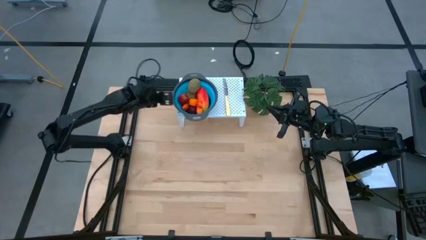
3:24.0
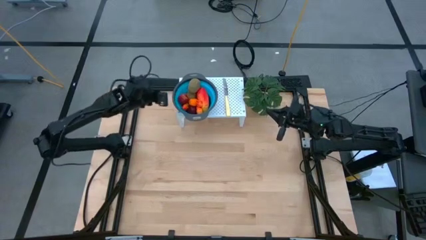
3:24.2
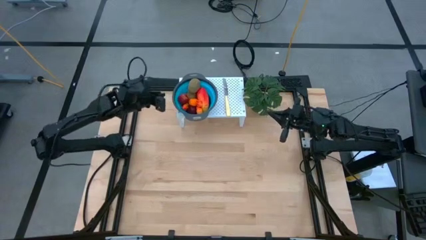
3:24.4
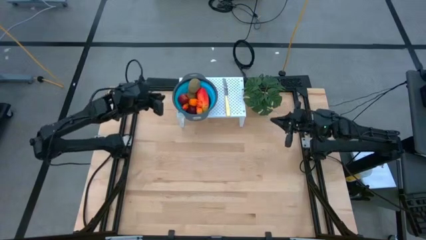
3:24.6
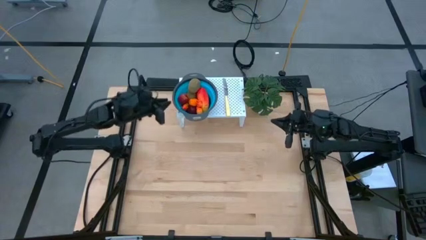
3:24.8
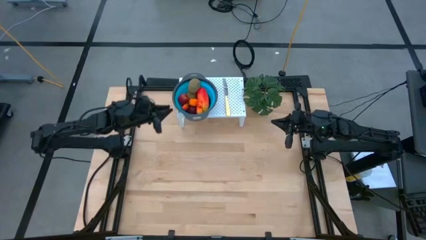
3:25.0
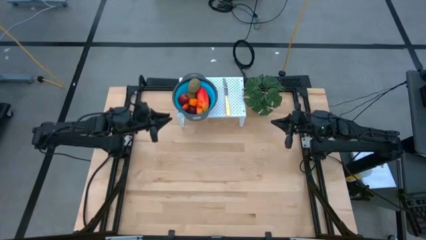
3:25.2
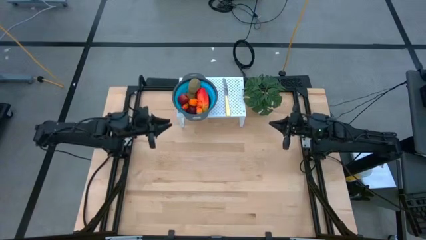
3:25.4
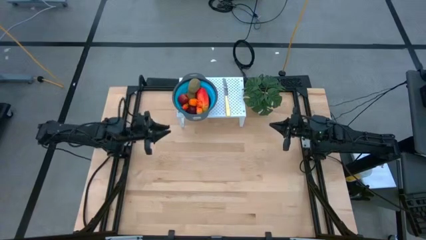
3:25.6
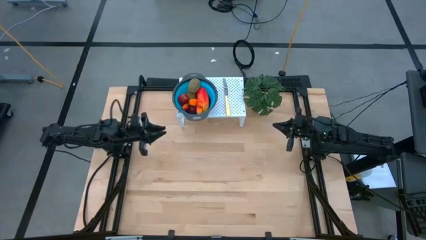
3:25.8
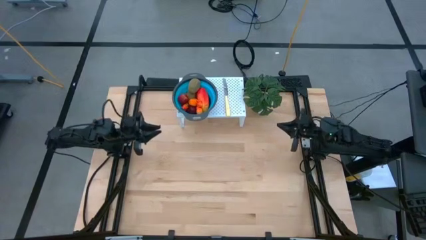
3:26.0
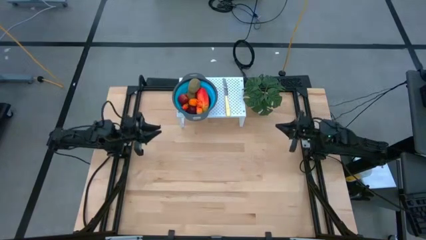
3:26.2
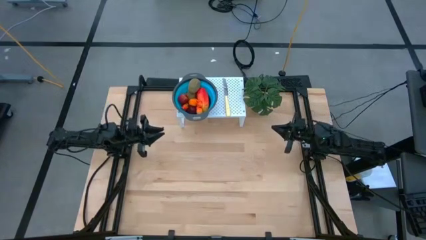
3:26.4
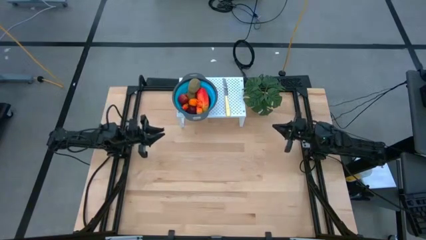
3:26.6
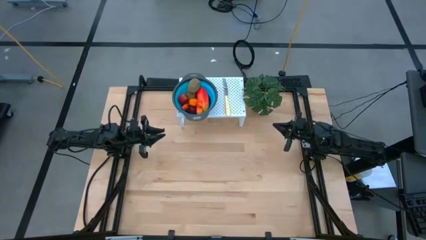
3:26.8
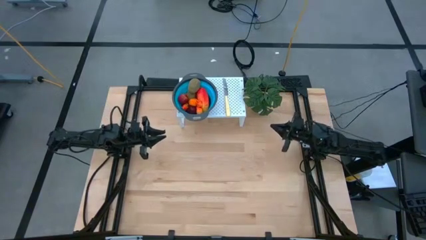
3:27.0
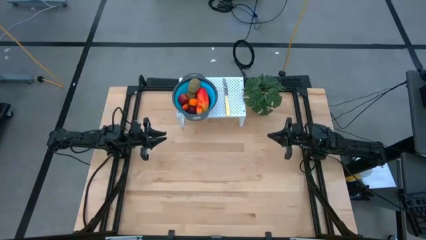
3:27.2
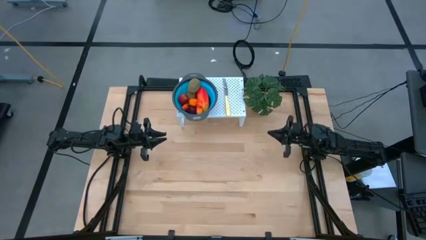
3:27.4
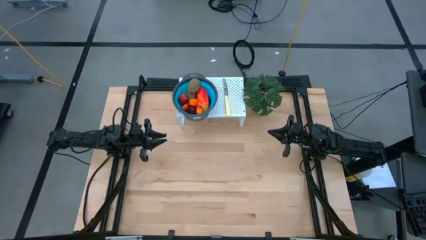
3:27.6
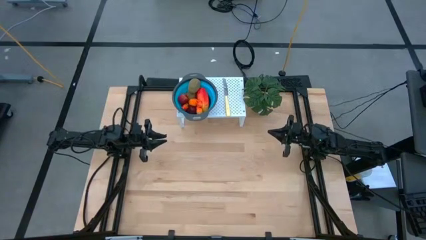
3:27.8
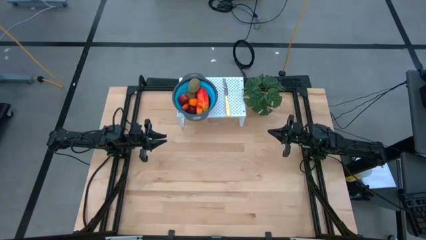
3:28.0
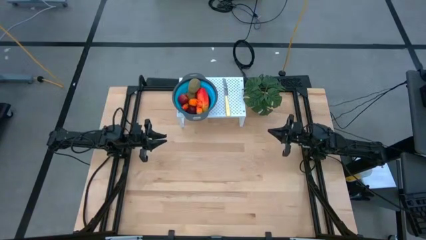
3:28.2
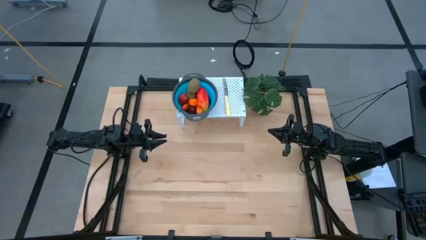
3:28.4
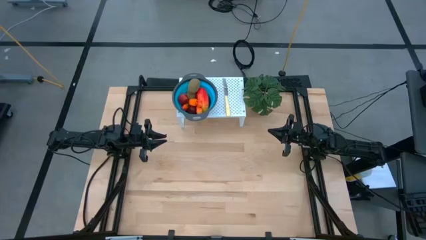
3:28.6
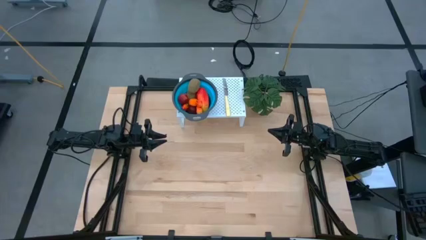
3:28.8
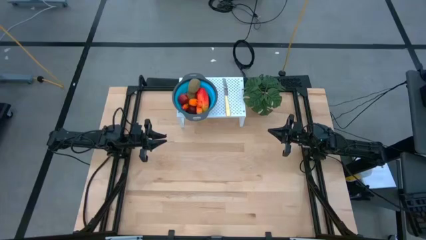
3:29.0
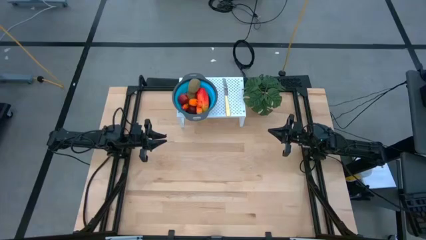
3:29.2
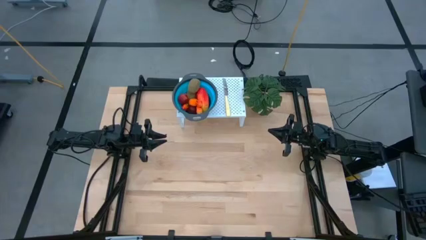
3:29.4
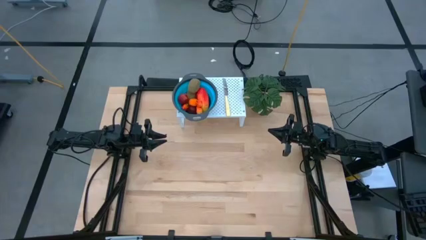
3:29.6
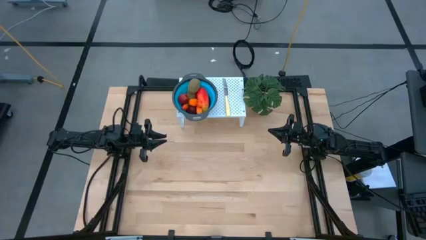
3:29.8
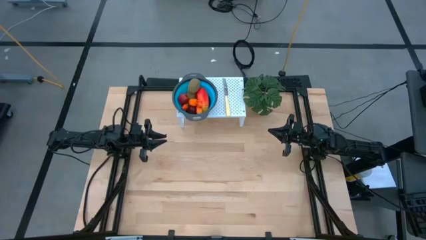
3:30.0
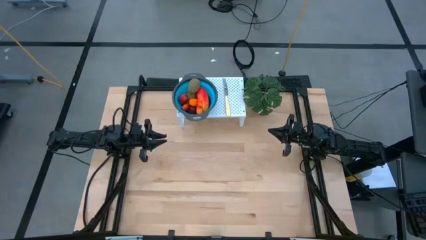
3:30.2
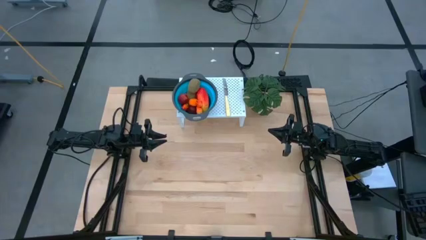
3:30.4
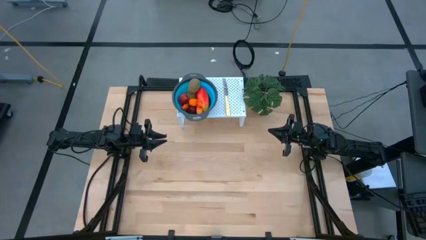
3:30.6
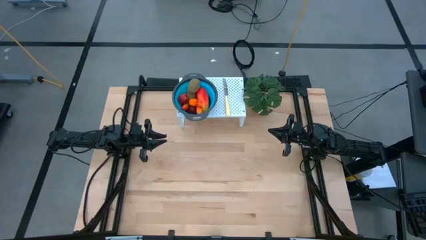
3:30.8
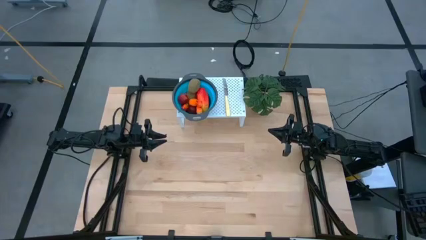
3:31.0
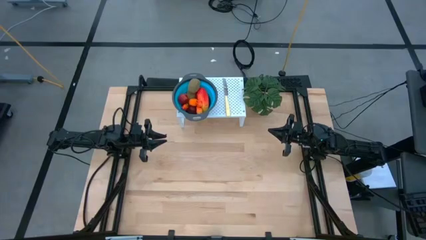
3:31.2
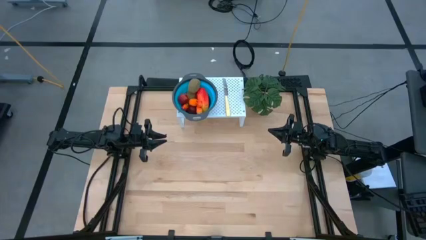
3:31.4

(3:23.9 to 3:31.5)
Task: Pick & Place Fruit
Return to Home Position

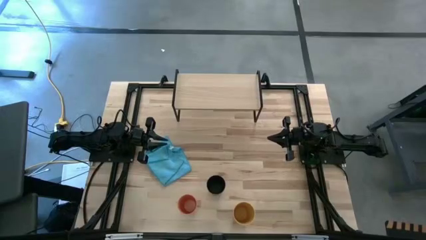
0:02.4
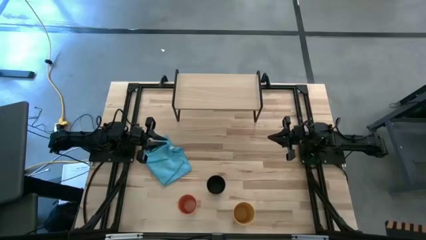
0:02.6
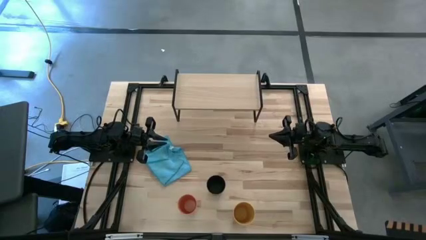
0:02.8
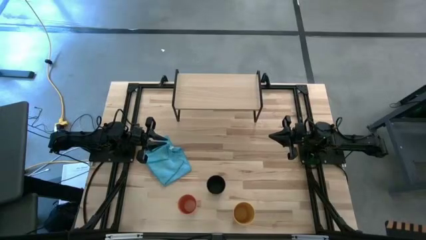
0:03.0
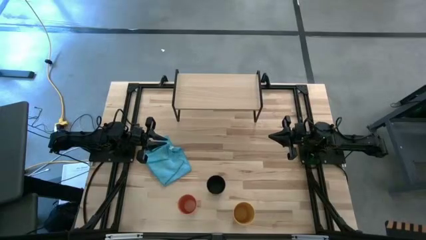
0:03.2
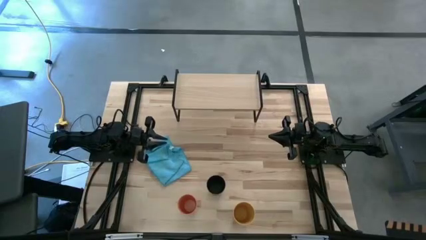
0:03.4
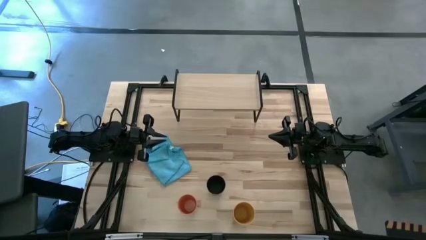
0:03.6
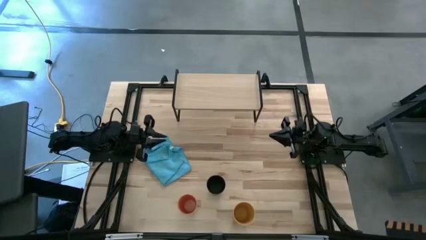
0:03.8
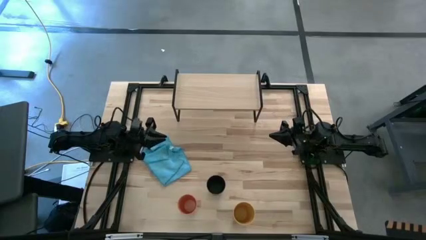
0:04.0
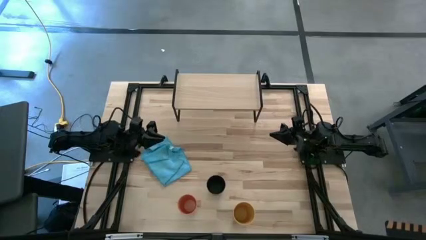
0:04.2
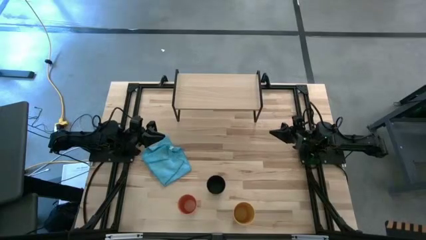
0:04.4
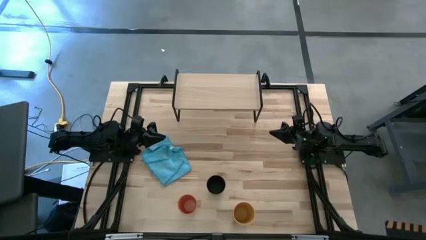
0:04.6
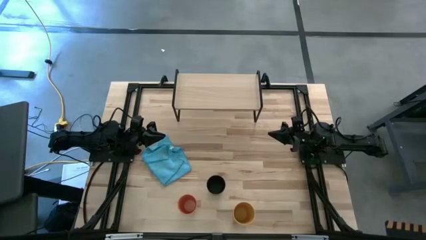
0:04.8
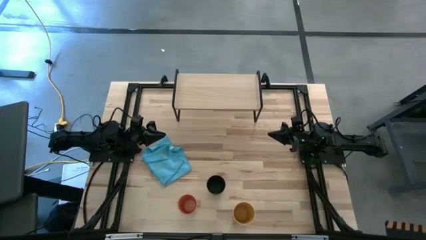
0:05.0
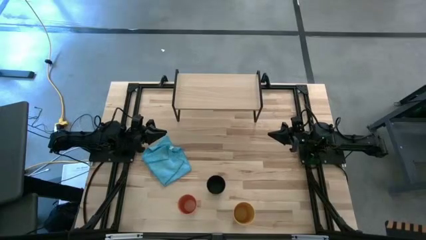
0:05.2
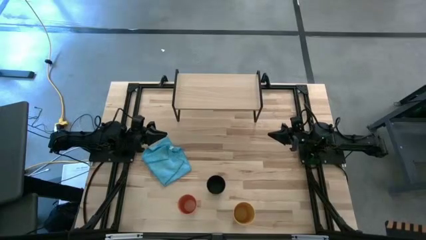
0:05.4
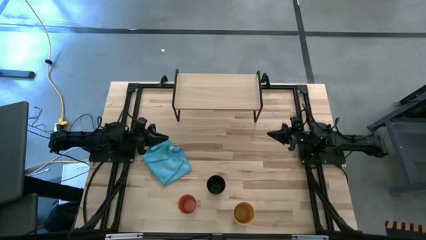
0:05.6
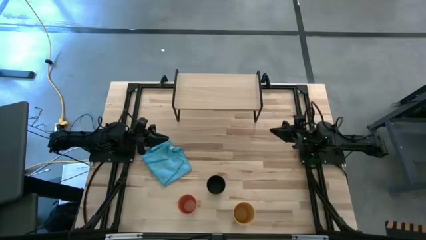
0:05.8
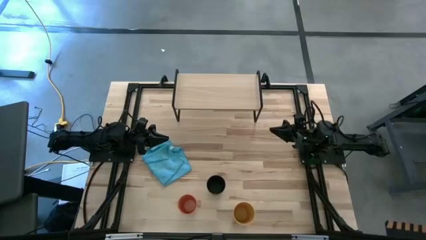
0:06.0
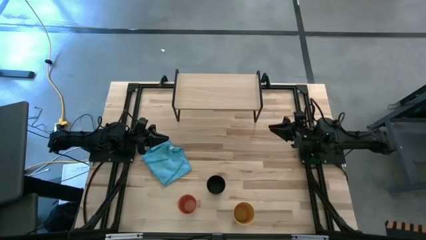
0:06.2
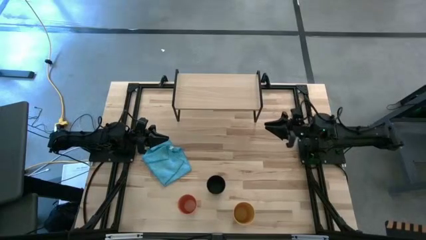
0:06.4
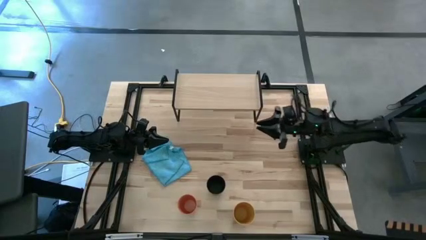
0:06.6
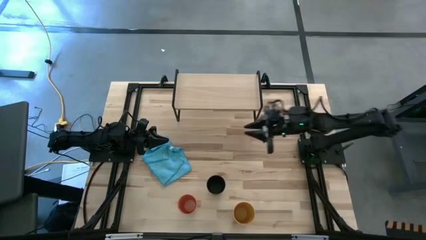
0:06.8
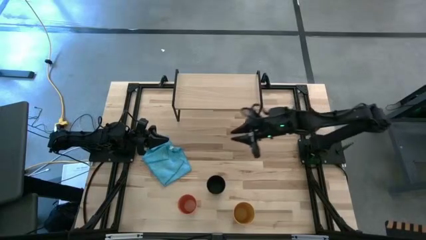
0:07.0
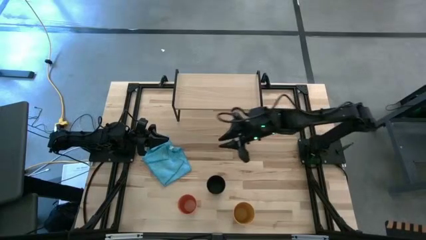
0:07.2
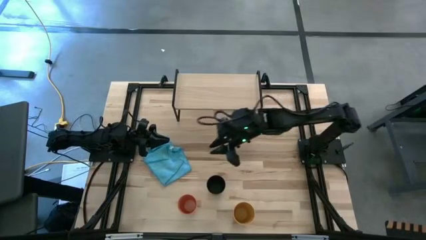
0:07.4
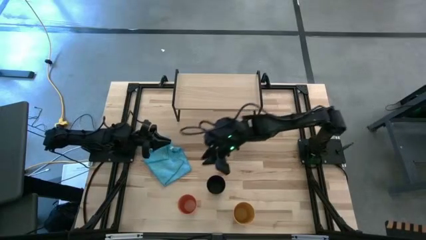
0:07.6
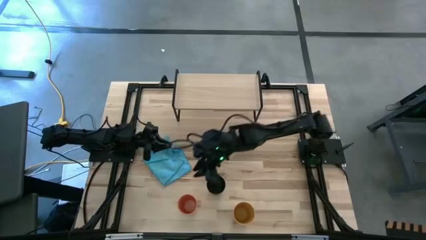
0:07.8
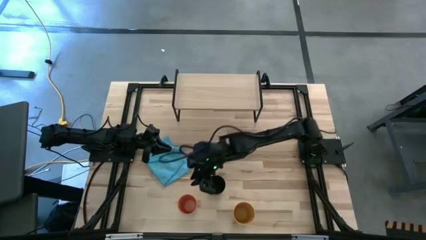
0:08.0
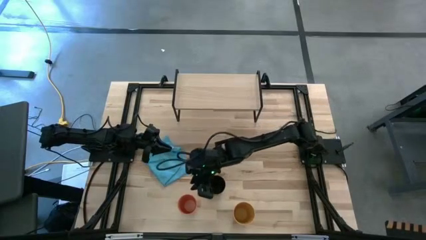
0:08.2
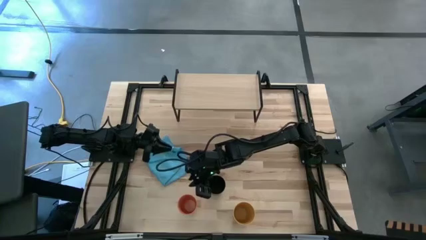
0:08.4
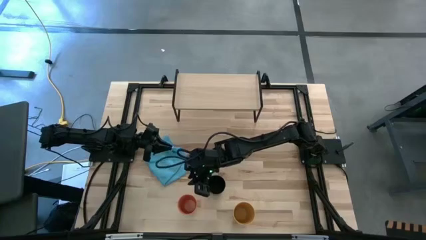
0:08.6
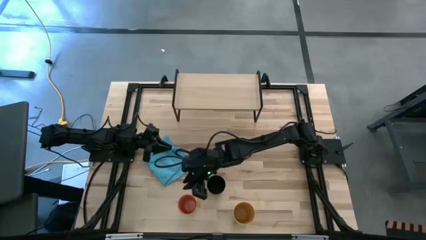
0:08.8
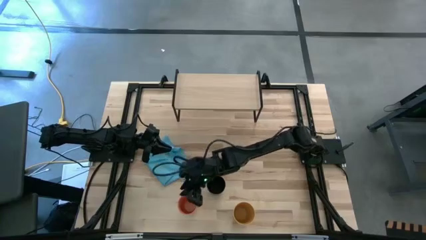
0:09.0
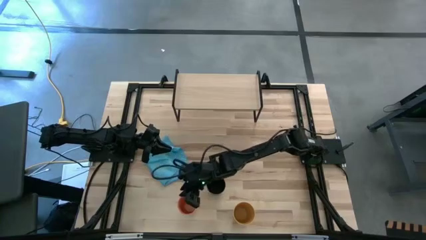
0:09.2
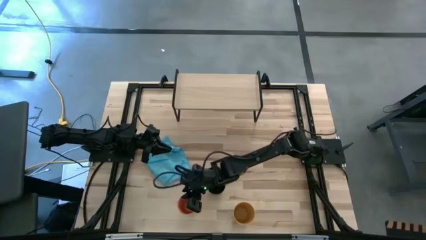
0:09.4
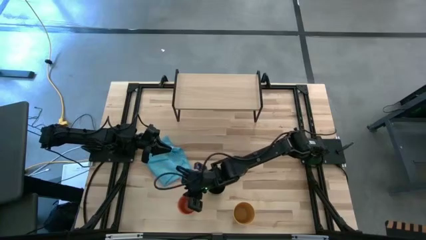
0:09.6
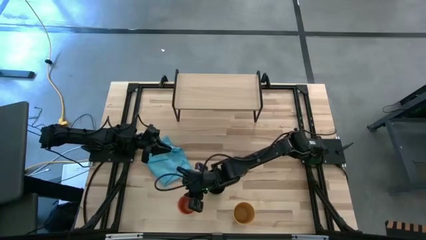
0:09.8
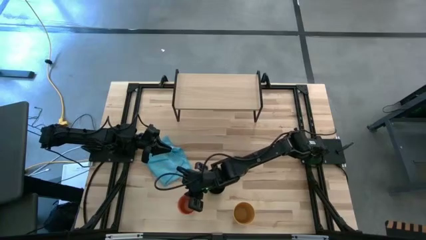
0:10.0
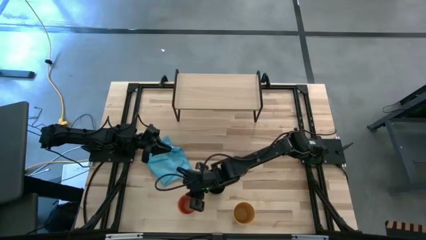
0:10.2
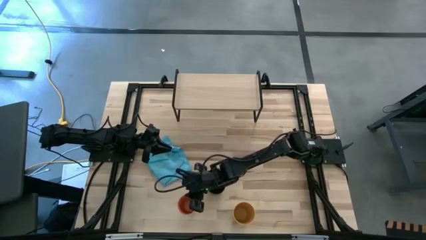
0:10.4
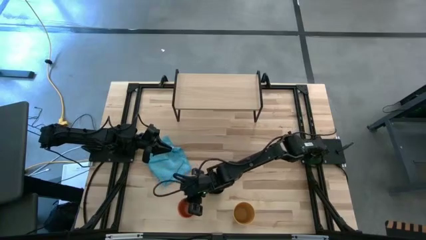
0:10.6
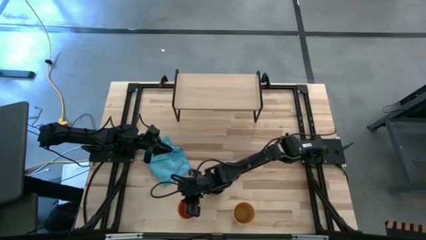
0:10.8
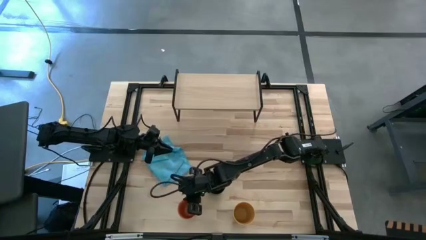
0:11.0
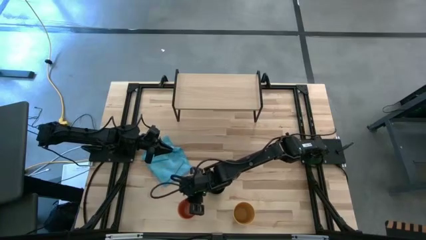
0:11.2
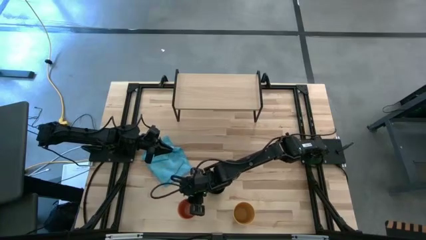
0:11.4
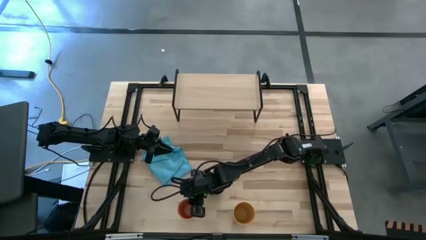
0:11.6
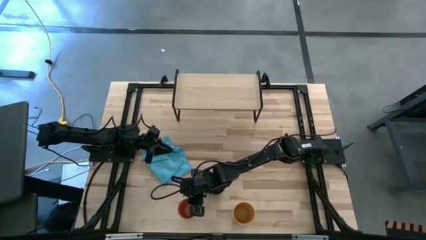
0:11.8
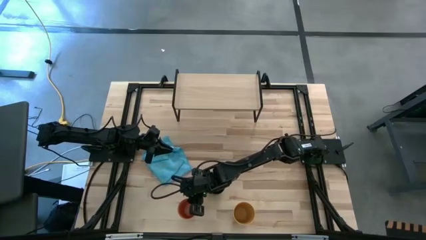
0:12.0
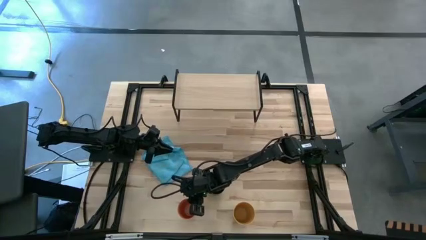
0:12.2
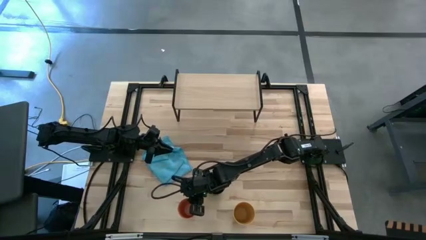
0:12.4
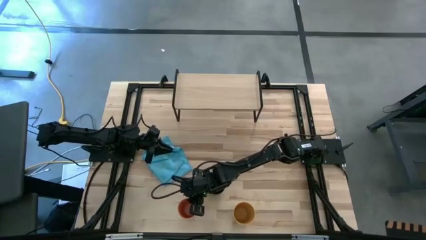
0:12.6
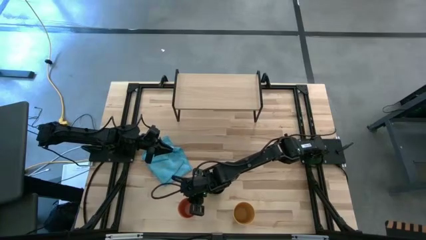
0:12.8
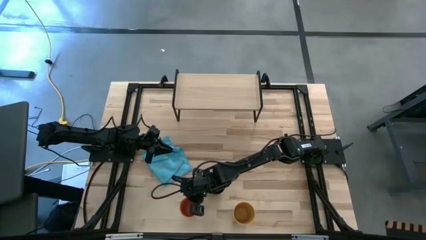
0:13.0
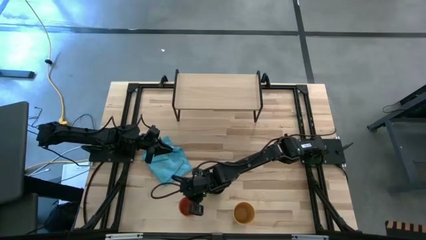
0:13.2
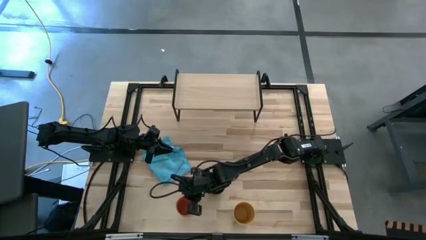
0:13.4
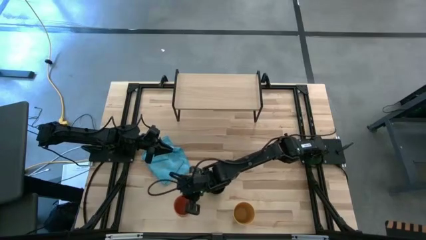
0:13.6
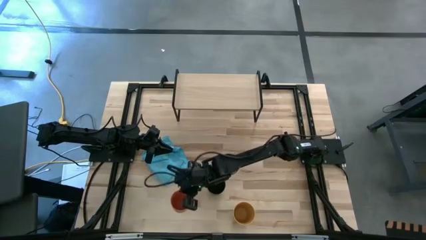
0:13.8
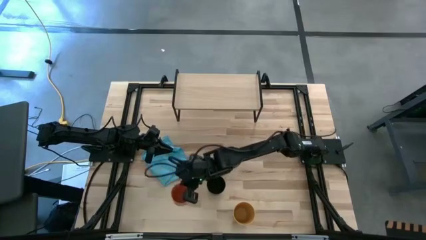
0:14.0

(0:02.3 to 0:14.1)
Task: Stack small to large cups/mugs on shelf
Put the orange cup on the shelf
